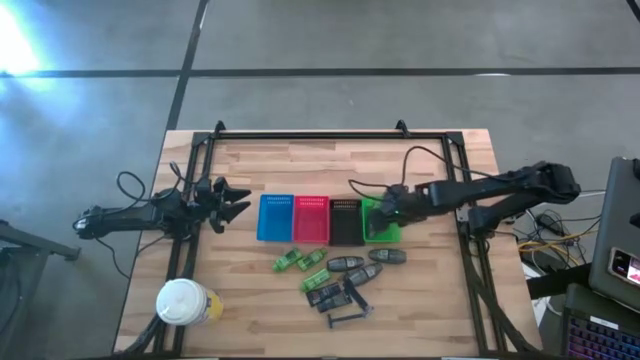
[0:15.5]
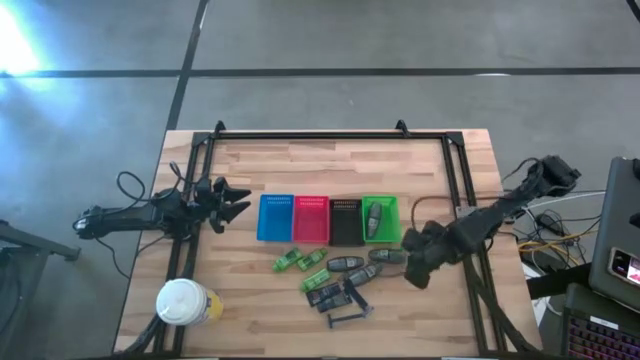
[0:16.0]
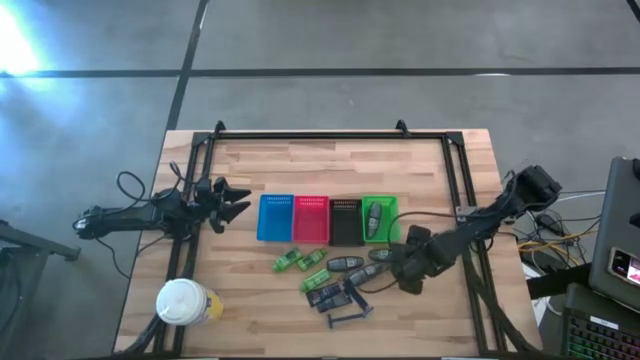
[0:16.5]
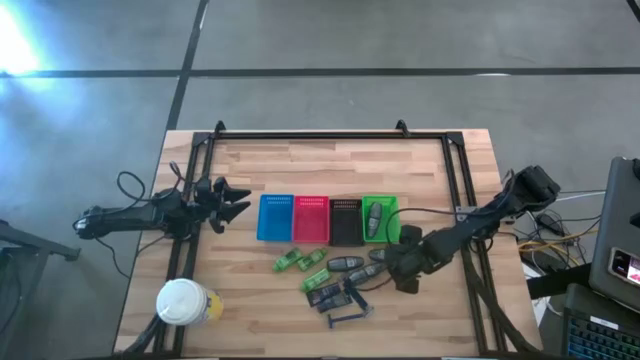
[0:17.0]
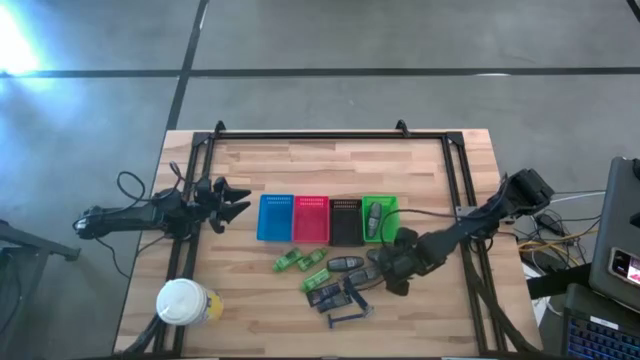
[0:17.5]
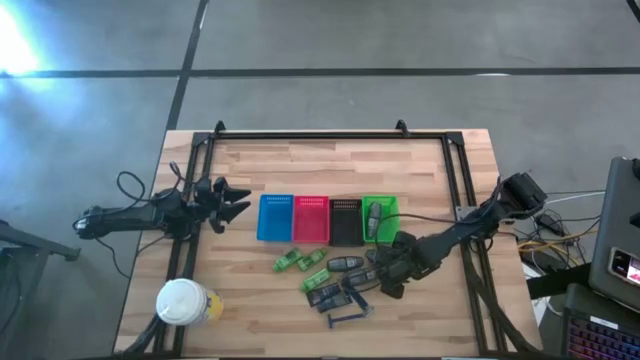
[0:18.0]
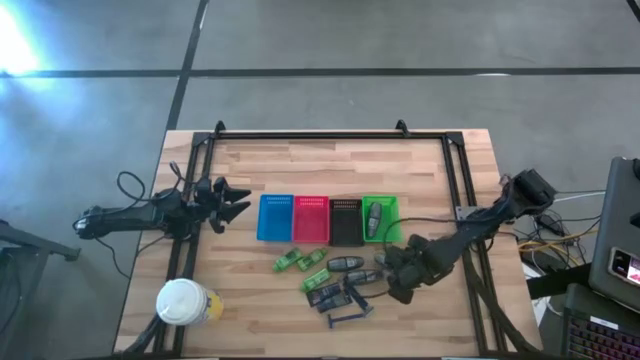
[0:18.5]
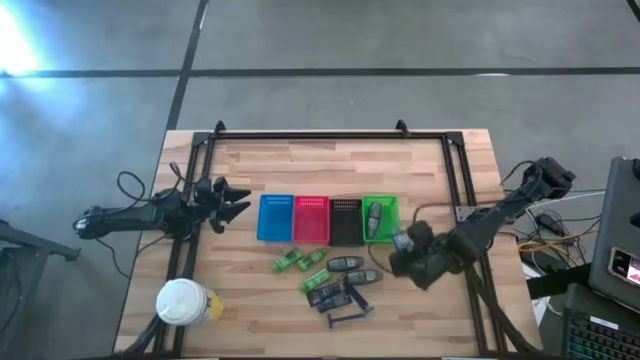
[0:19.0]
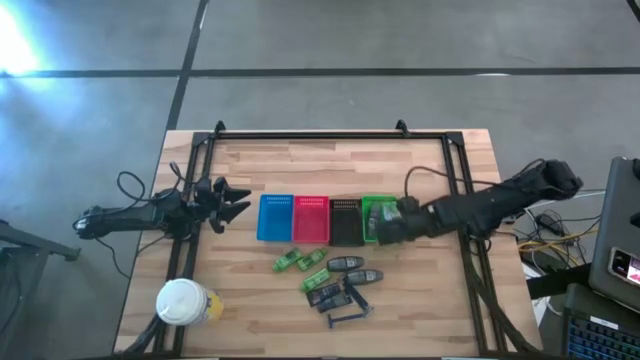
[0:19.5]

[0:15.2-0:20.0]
Task: Pick & Place Travel size toiletries
Put the deodorant into the green bin

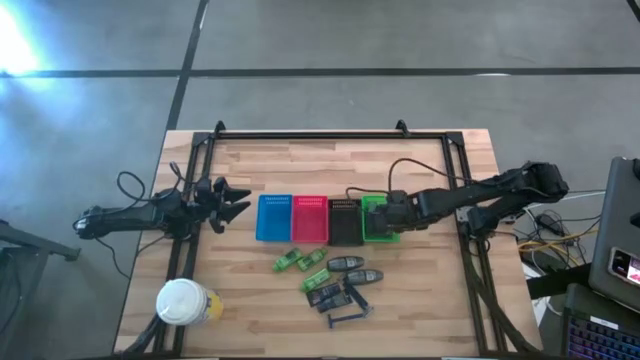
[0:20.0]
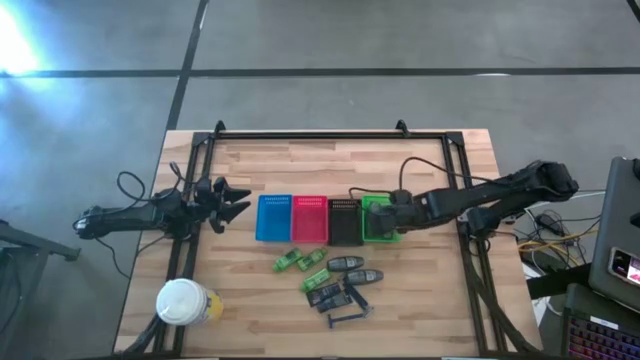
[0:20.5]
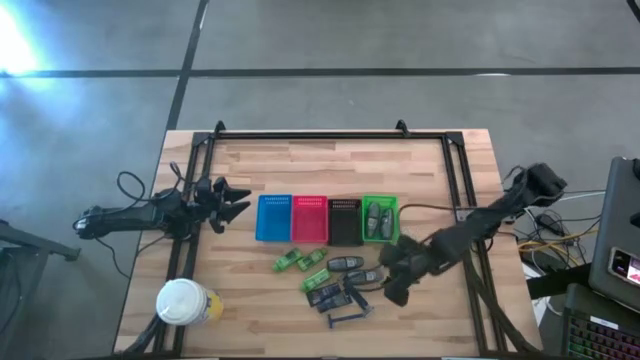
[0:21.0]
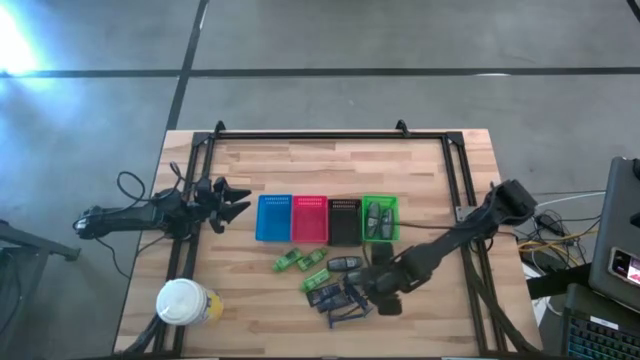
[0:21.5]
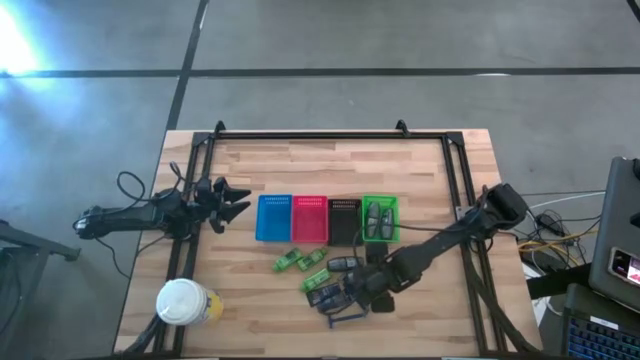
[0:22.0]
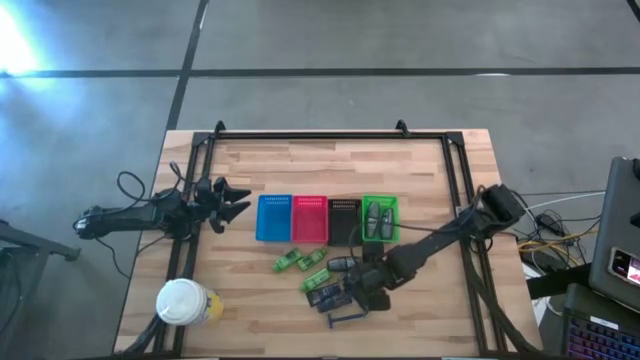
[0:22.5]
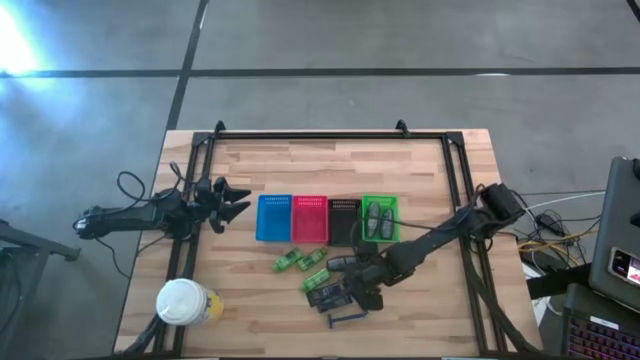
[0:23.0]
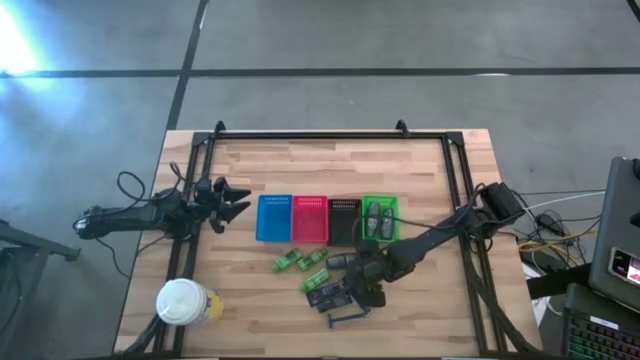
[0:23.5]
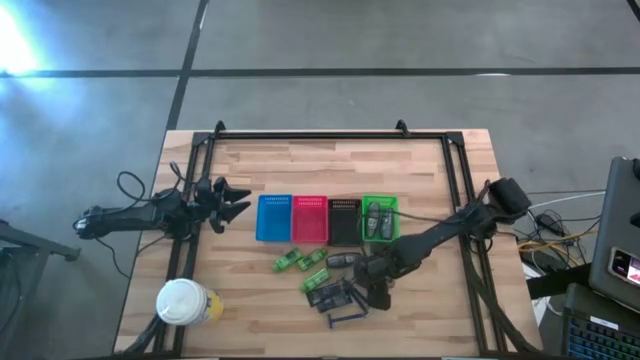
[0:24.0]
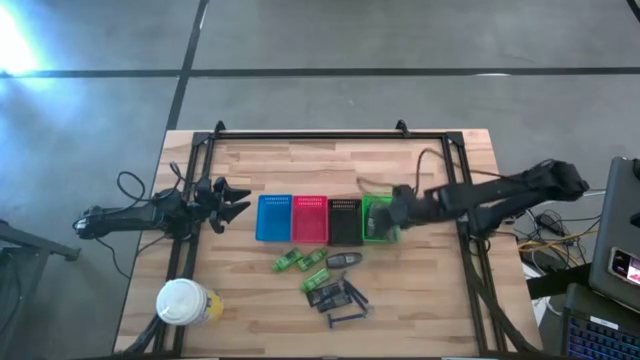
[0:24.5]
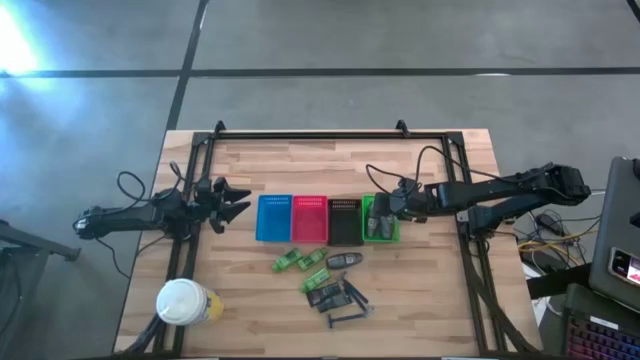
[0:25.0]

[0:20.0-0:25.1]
Put the deodorant into the green bin

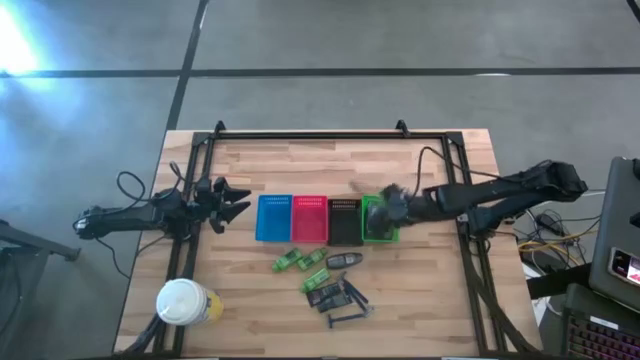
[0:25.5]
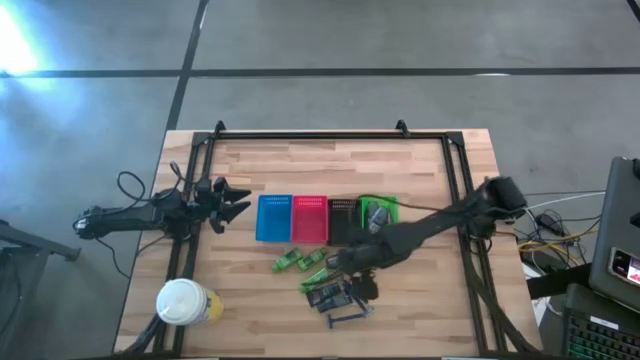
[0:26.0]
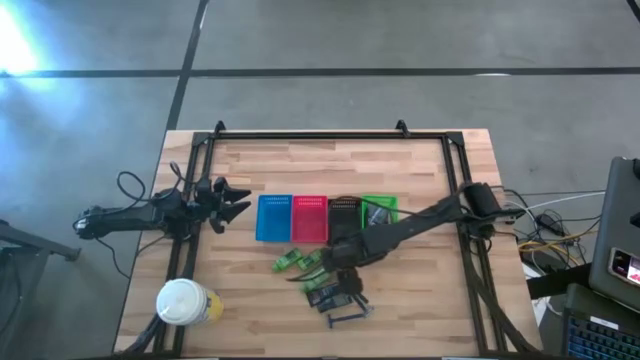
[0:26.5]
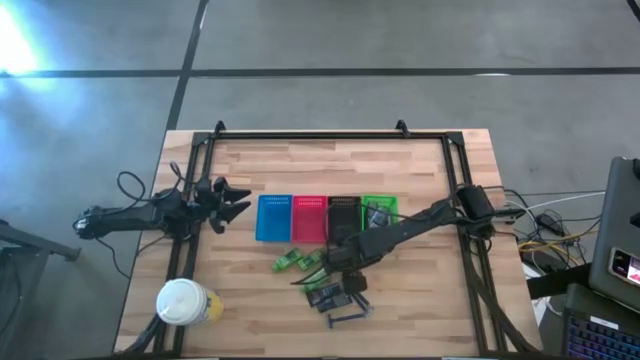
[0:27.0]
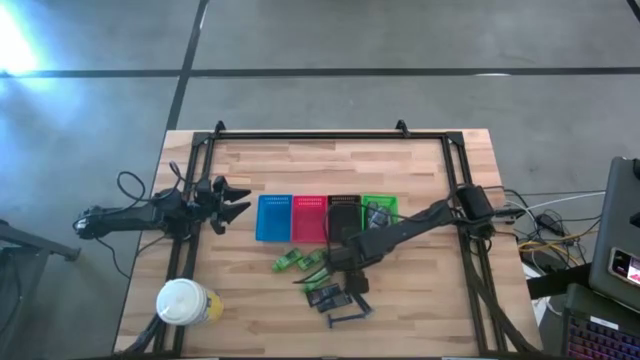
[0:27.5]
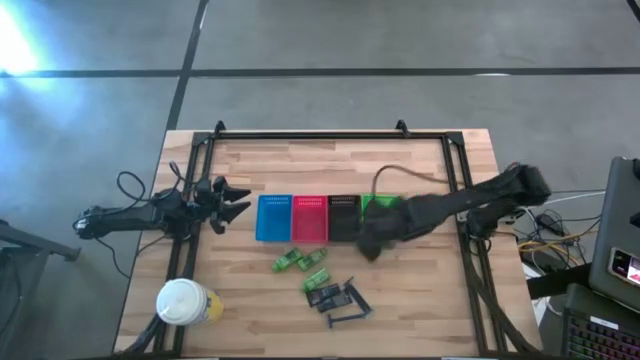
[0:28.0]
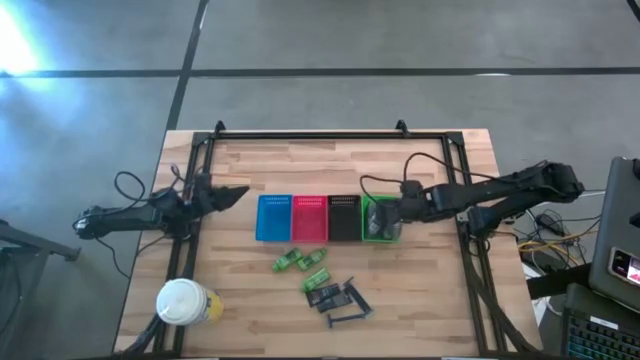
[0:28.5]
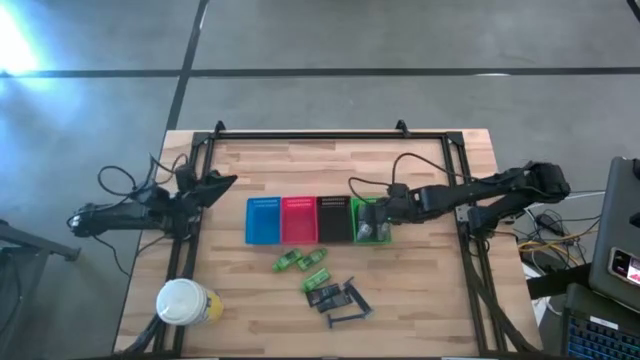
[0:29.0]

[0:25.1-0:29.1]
Put the deodorant into the green bin

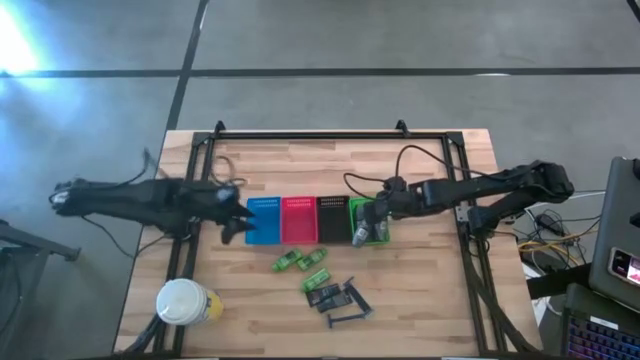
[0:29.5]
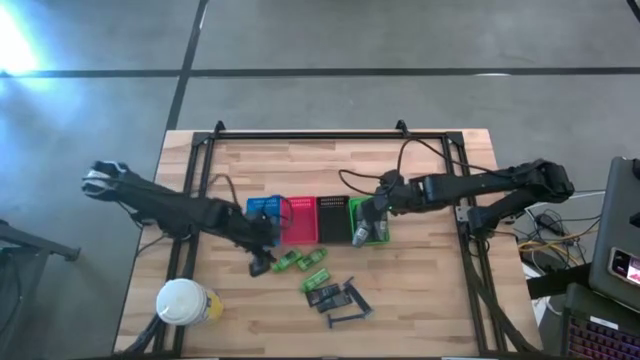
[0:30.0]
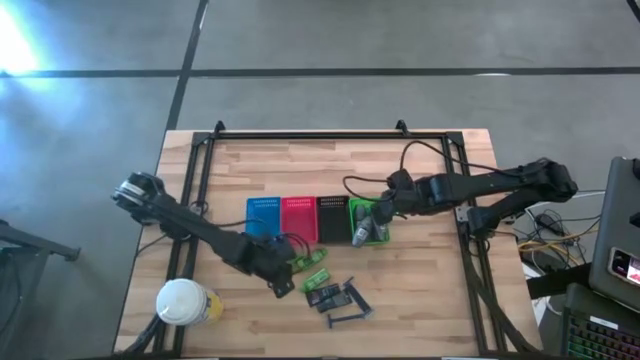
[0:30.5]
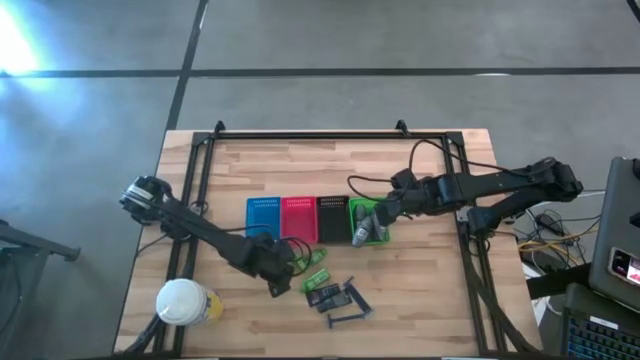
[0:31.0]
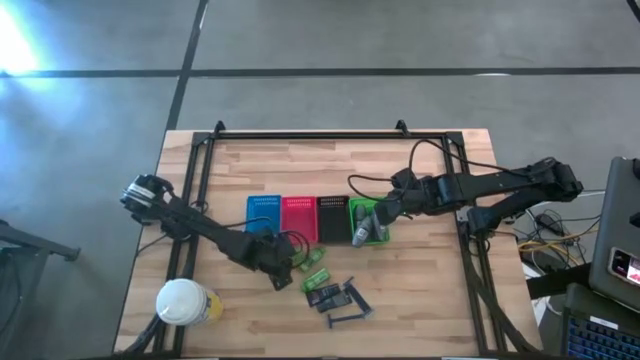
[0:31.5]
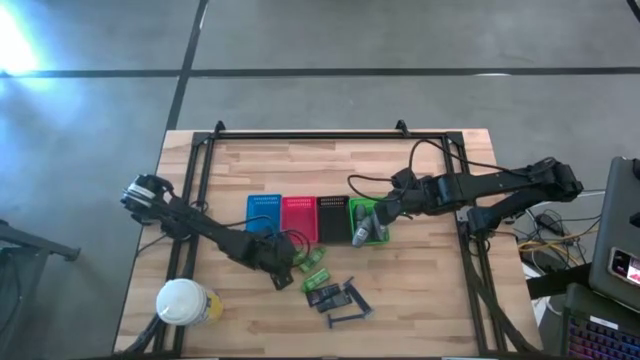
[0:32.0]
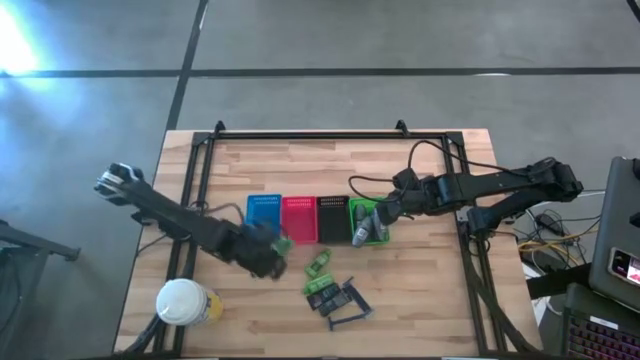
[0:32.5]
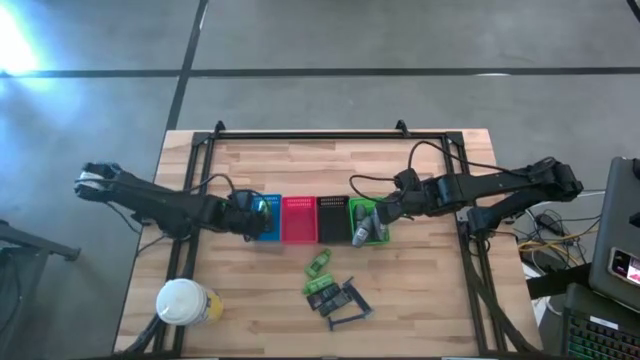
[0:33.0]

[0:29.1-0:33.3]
Put the left shampoo into the blue bin

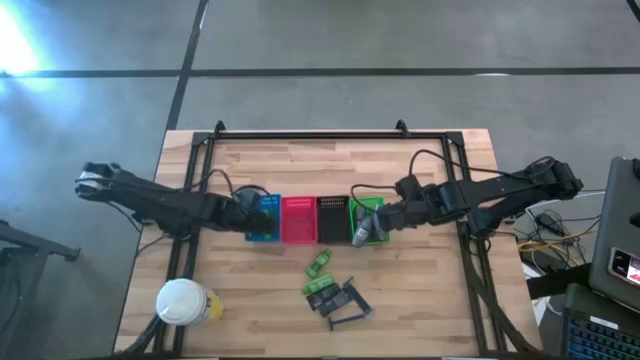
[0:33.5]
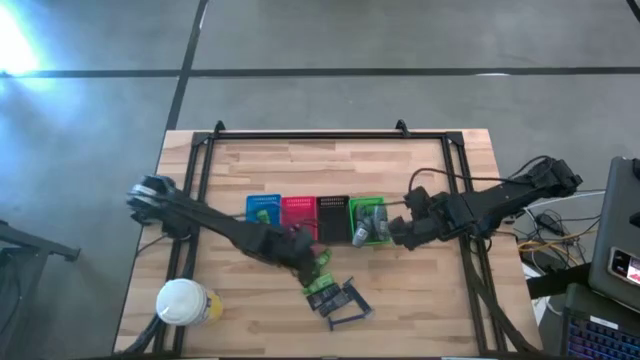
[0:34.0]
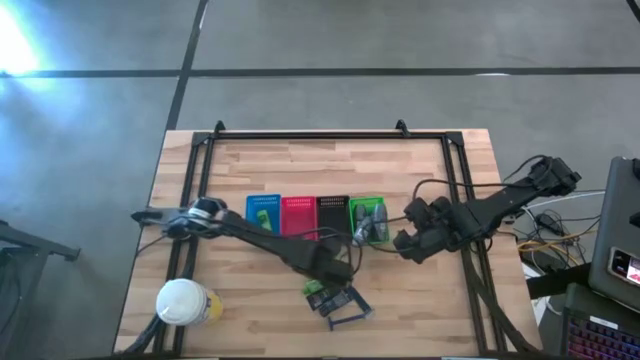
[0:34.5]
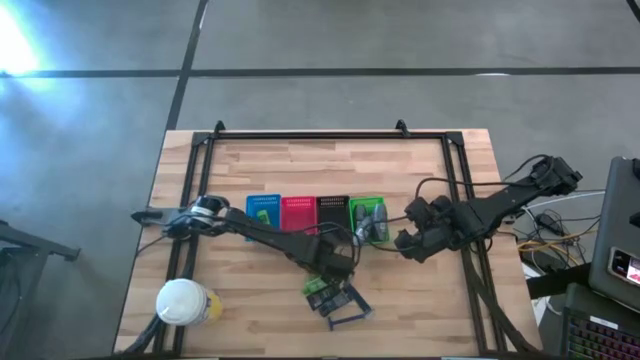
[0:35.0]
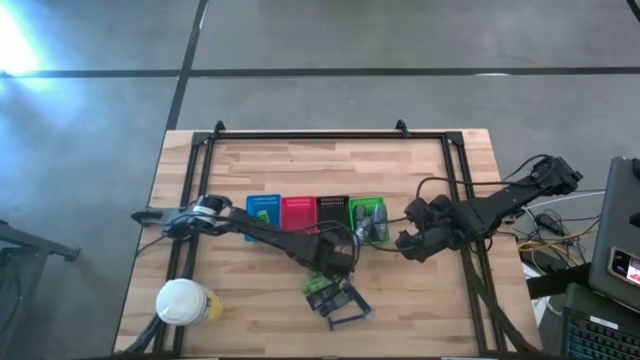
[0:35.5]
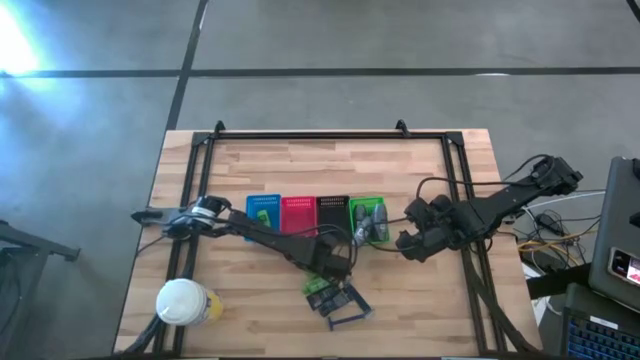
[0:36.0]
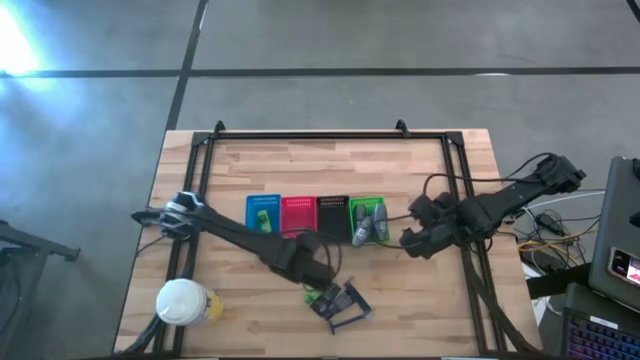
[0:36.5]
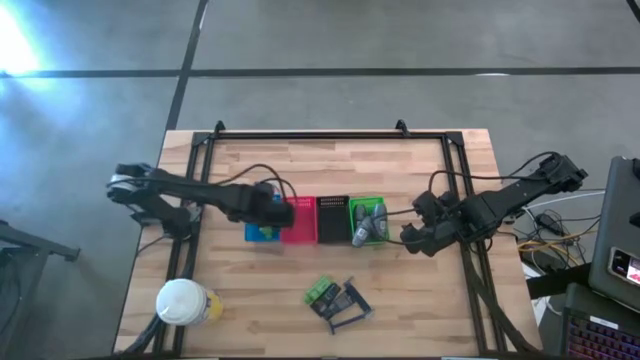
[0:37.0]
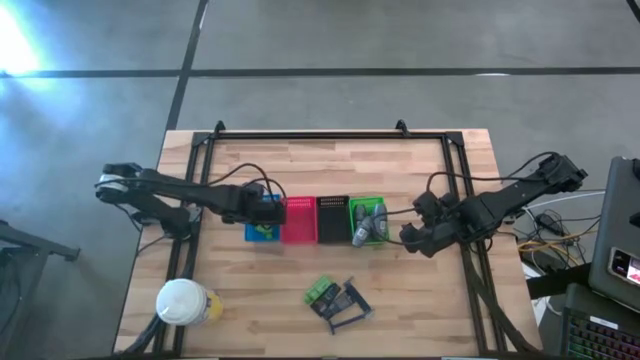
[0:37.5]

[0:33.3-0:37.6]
Put the top shampoo into the blue bin
